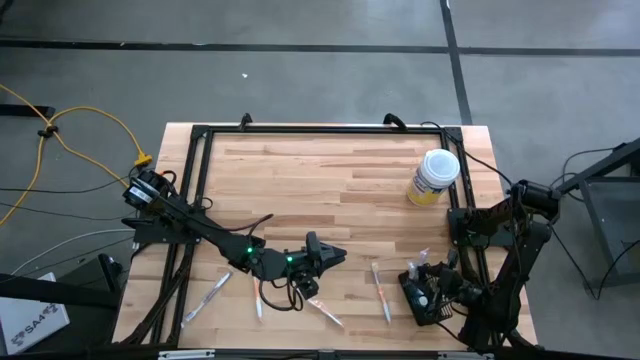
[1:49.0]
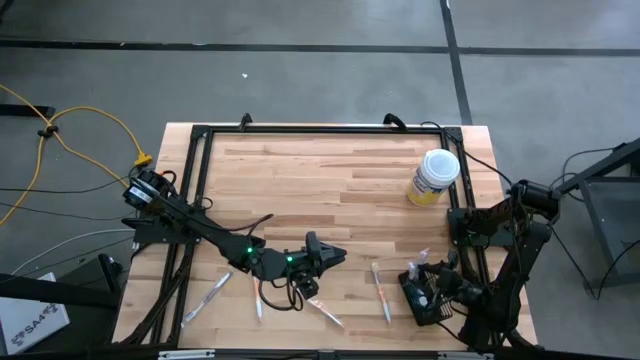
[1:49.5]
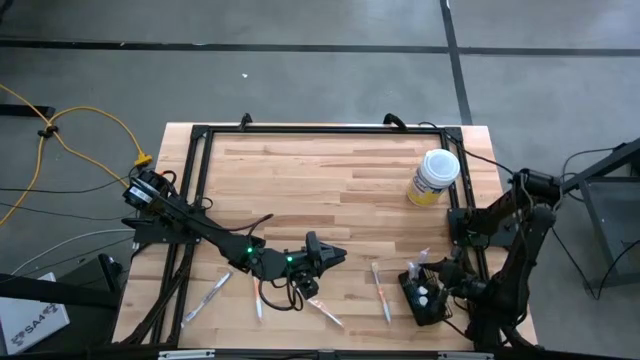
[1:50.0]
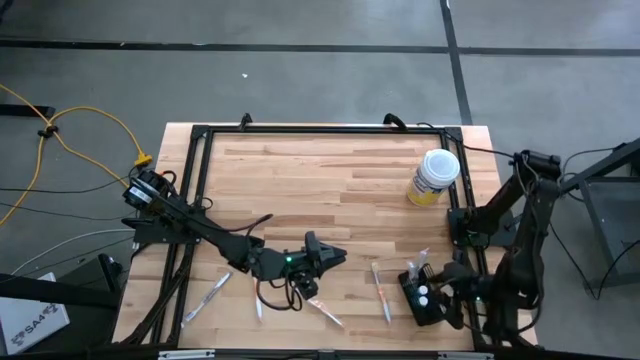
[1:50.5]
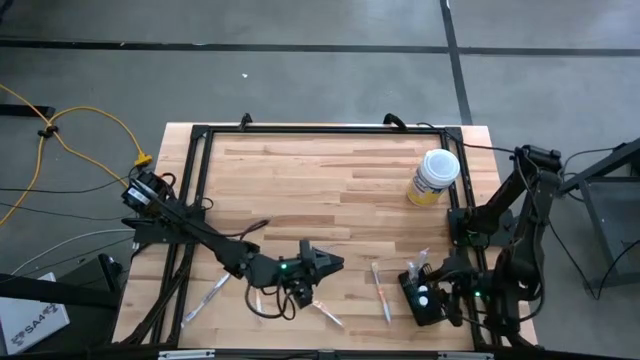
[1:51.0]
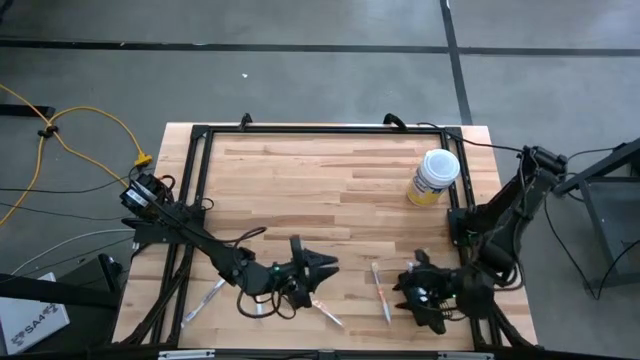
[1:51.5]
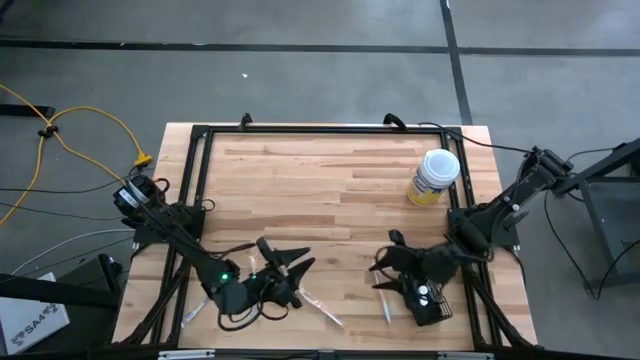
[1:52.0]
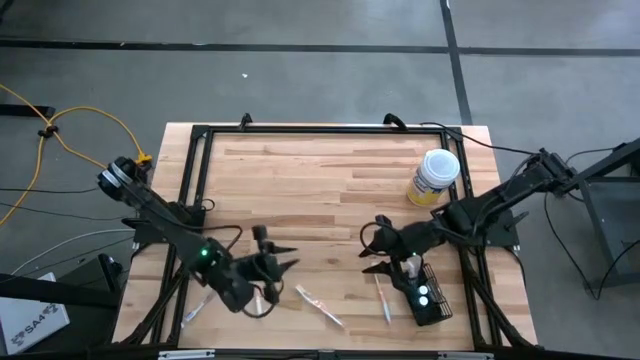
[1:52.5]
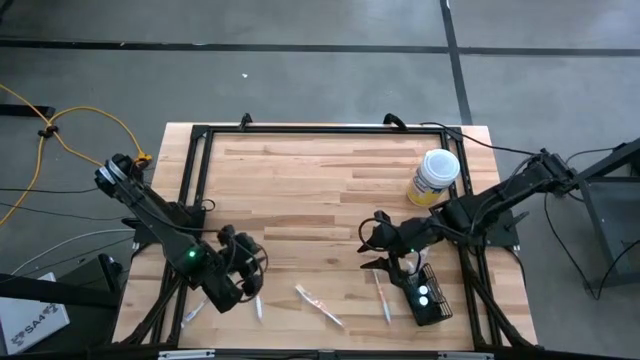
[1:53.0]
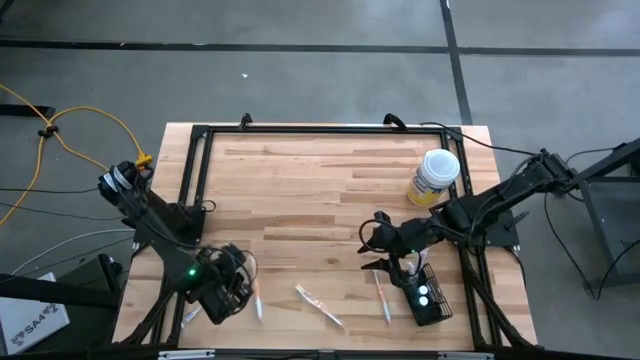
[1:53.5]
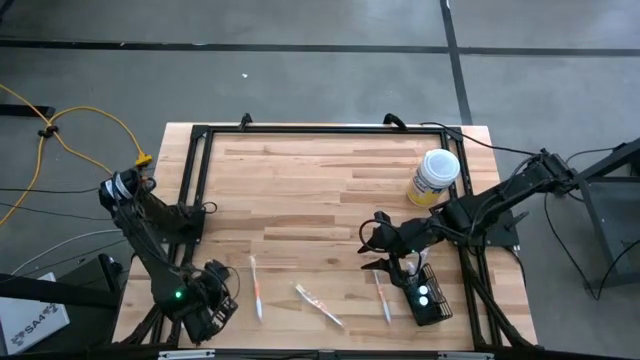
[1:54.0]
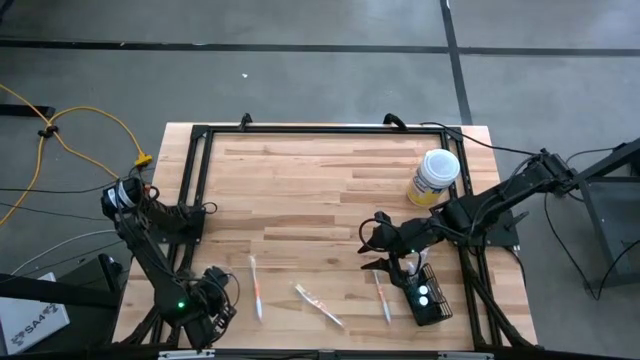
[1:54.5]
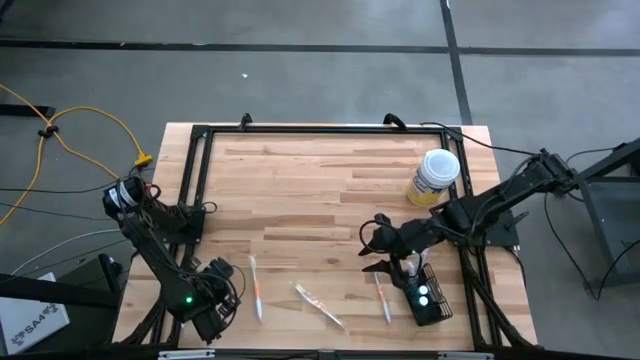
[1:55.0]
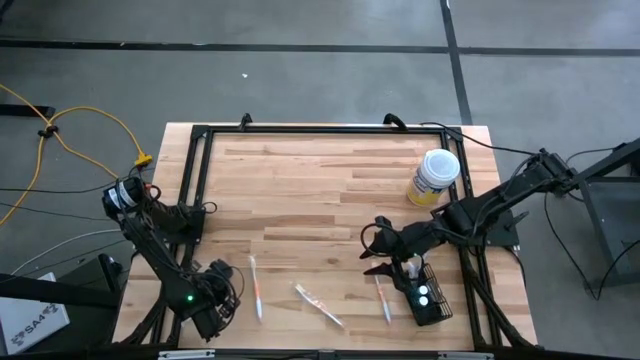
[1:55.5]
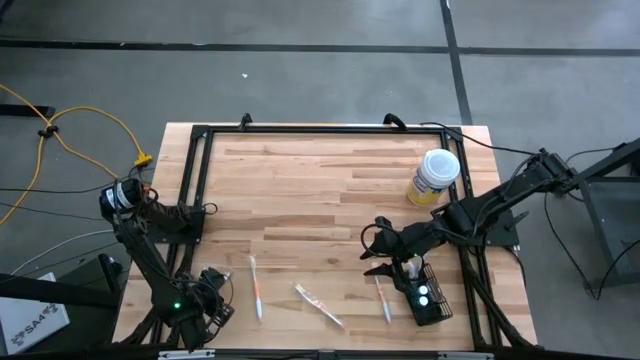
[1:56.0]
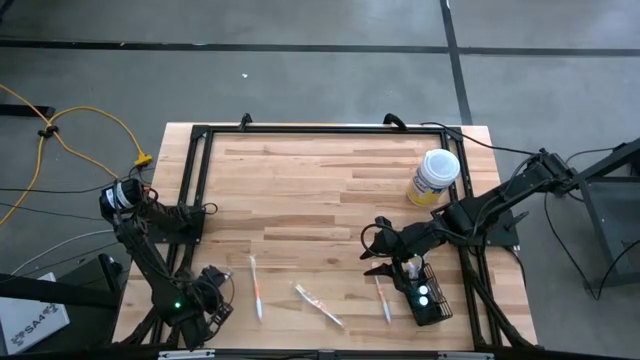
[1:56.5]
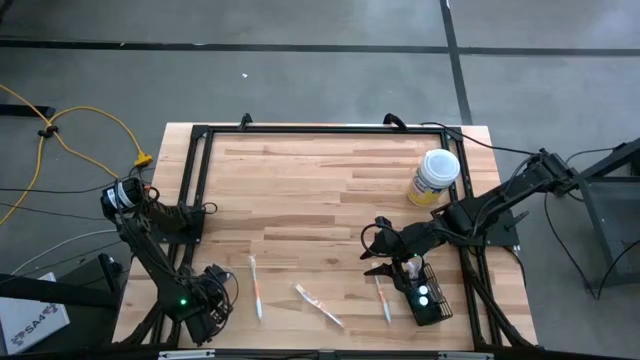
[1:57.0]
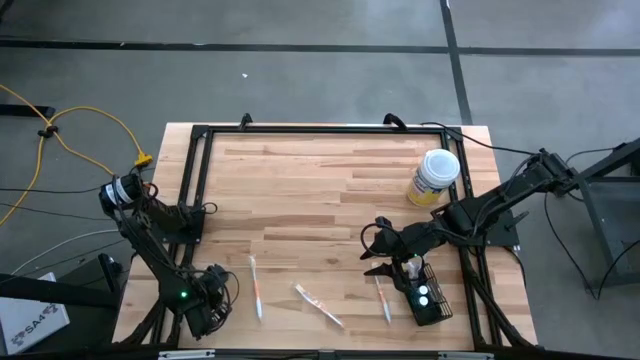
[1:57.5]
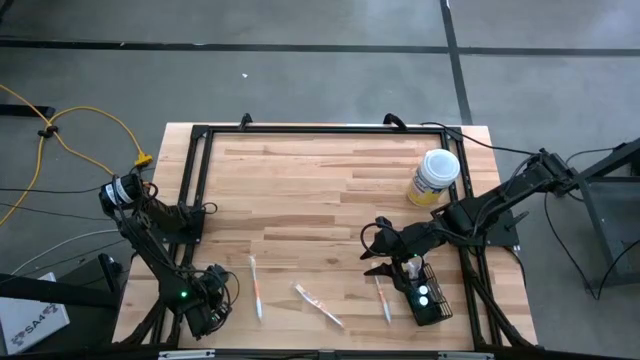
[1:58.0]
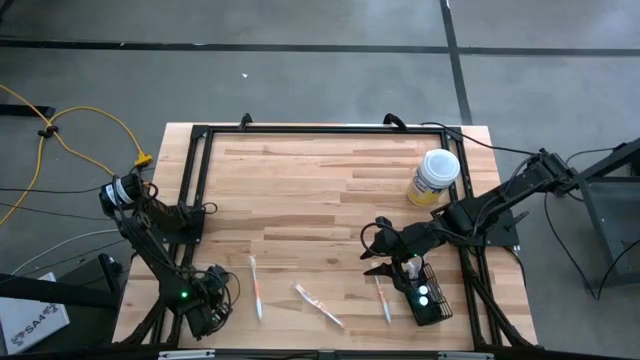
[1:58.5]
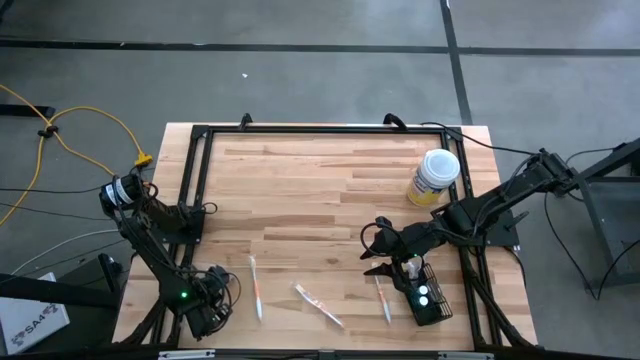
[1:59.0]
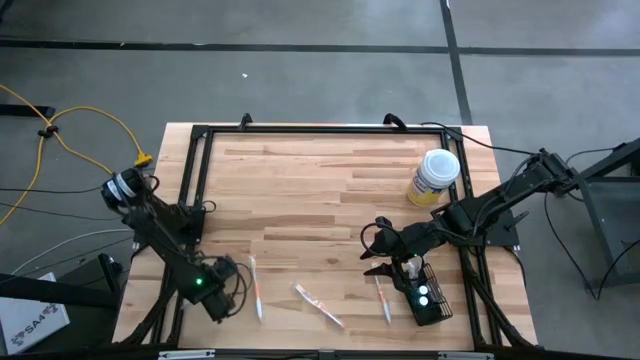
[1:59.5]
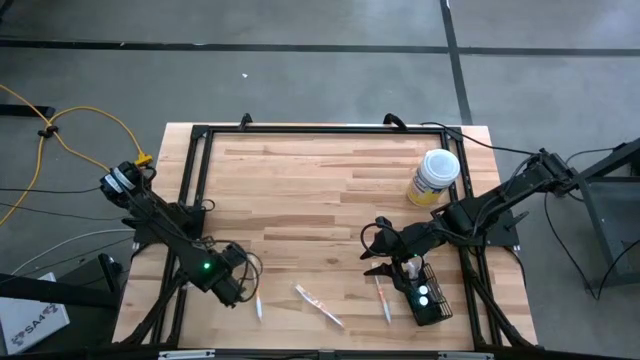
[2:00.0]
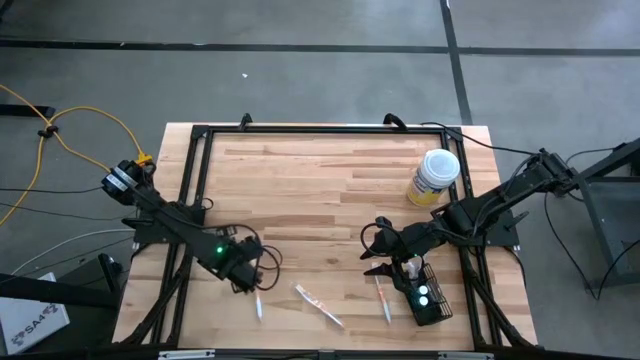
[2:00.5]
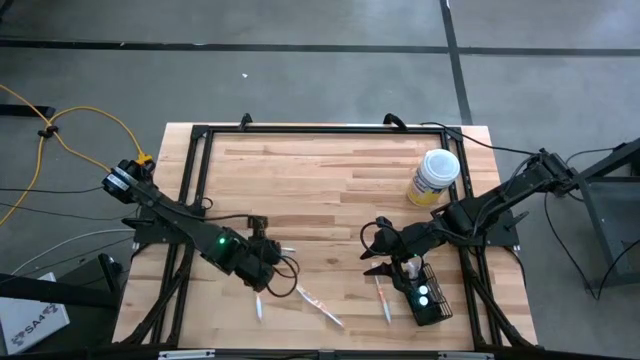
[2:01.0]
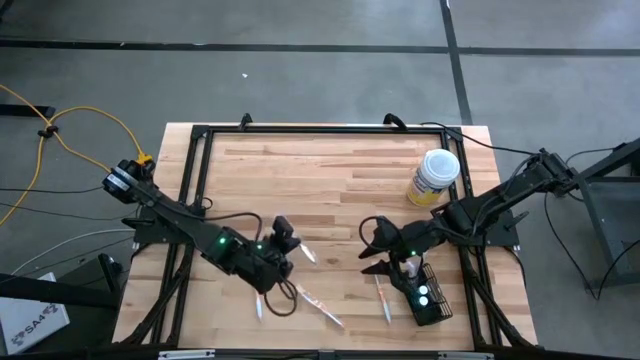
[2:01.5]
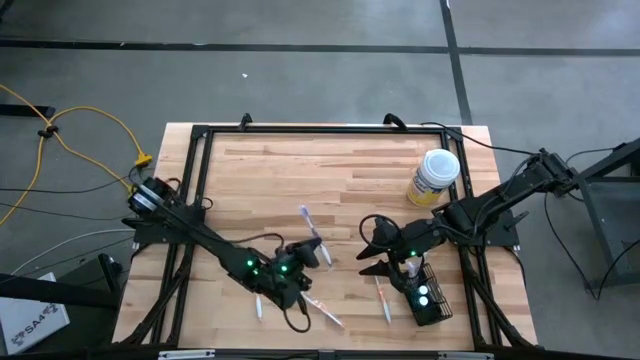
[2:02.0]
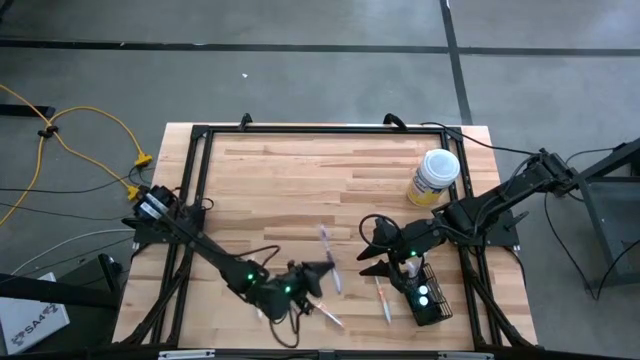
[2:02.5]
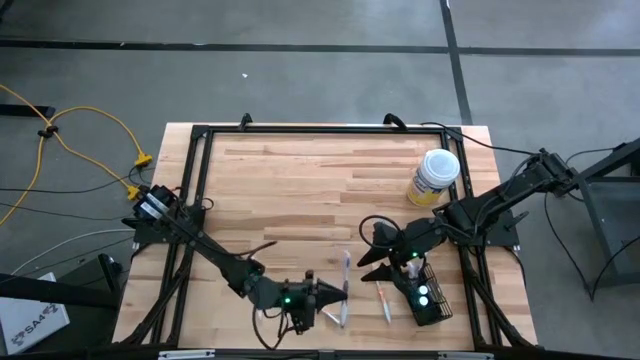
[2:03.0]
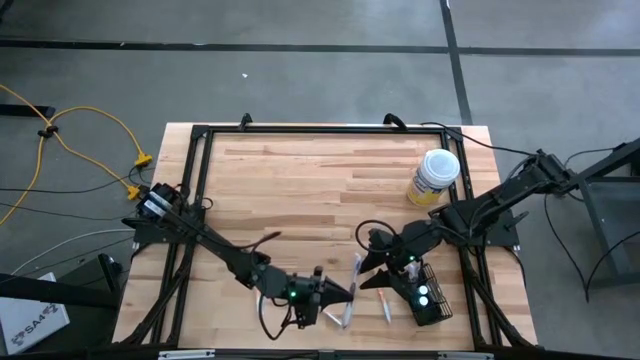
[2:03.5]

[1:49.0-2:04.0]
Task: Pick & Place toothbrushing station
Put the purple toothbrush into the mesh organizer
